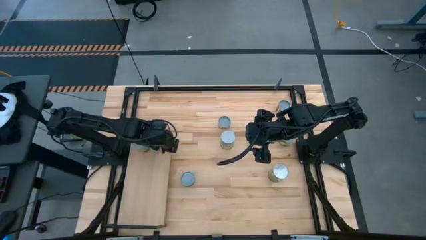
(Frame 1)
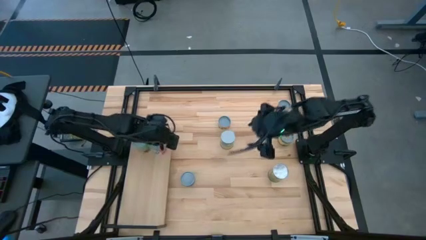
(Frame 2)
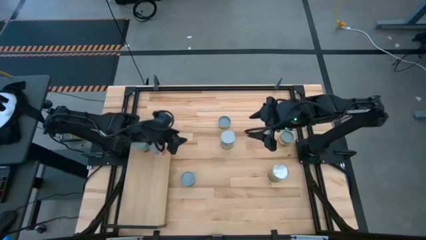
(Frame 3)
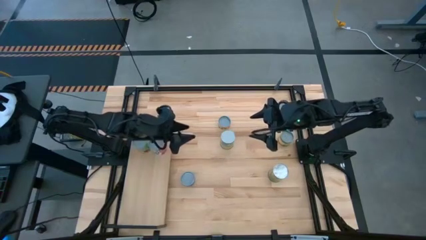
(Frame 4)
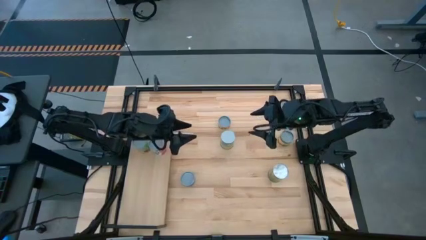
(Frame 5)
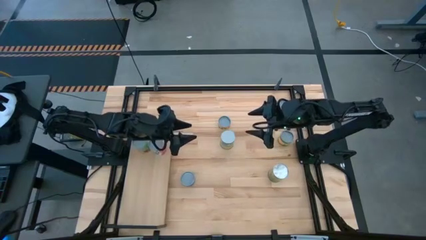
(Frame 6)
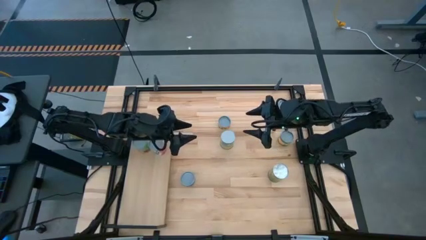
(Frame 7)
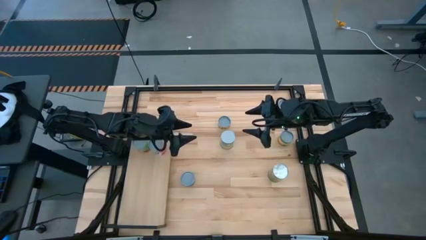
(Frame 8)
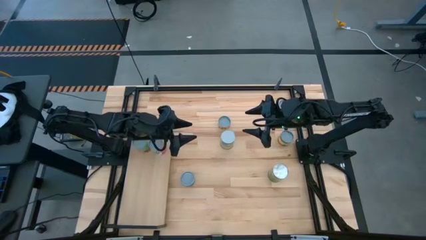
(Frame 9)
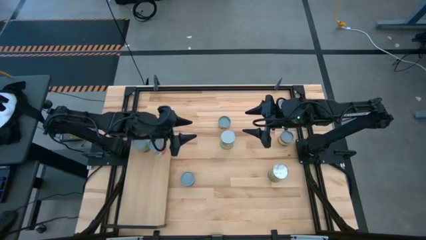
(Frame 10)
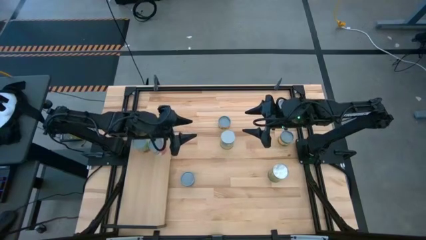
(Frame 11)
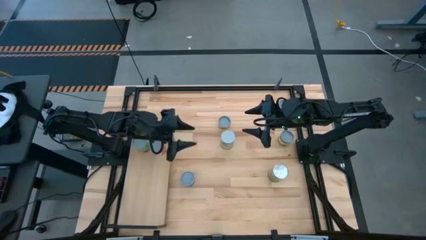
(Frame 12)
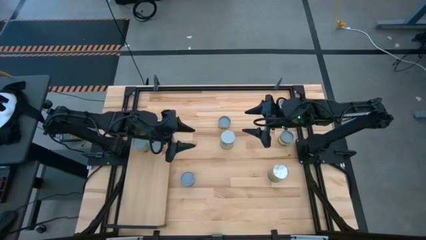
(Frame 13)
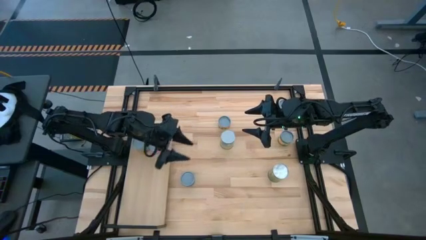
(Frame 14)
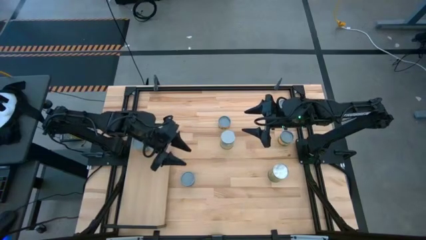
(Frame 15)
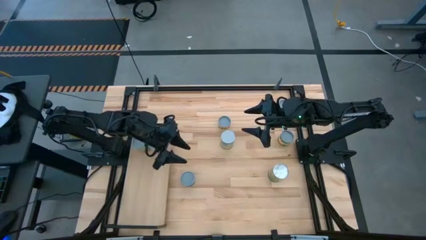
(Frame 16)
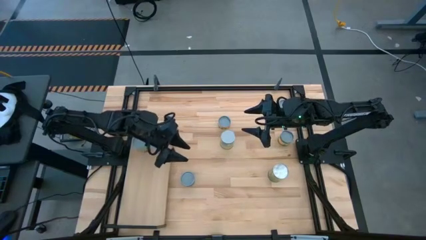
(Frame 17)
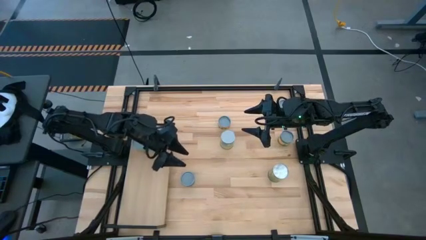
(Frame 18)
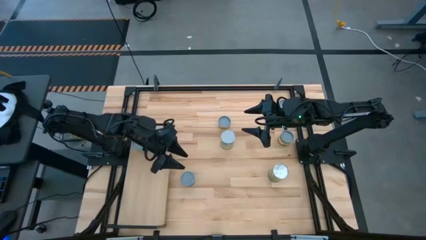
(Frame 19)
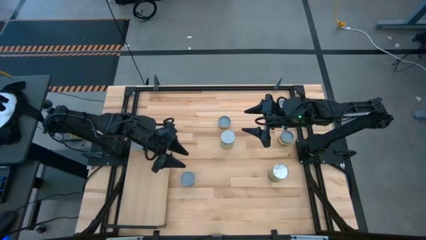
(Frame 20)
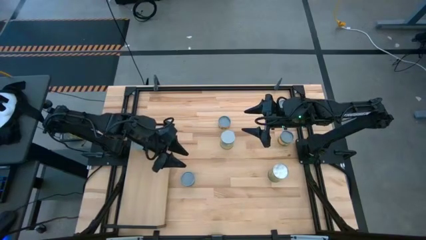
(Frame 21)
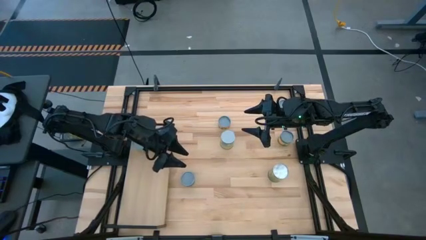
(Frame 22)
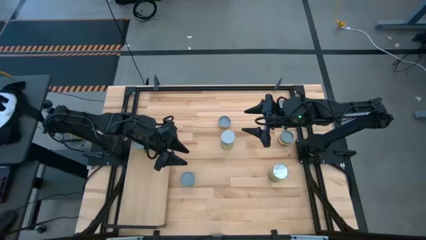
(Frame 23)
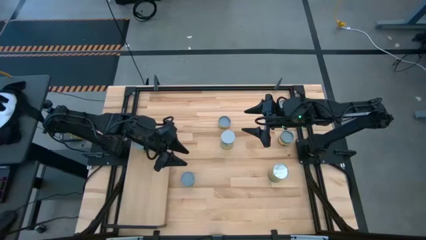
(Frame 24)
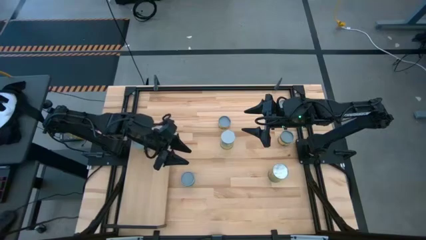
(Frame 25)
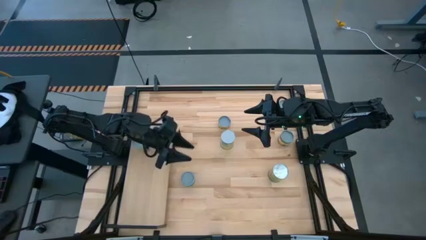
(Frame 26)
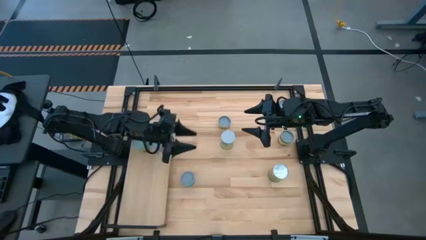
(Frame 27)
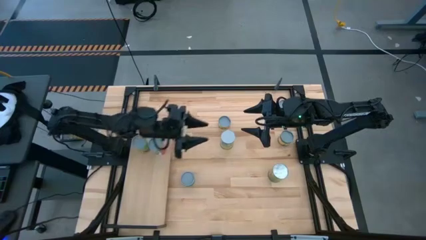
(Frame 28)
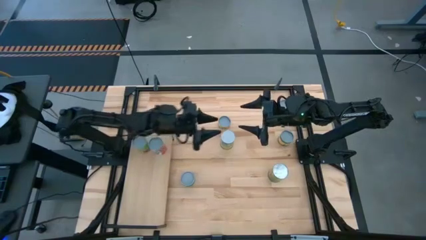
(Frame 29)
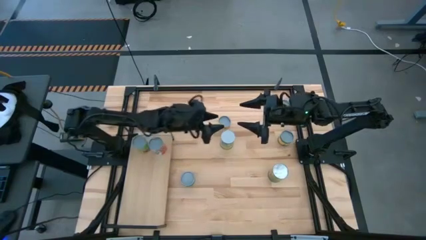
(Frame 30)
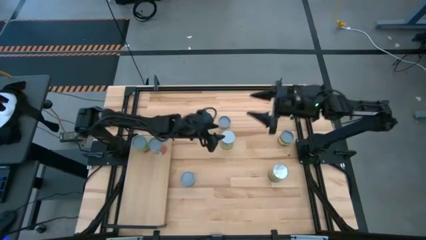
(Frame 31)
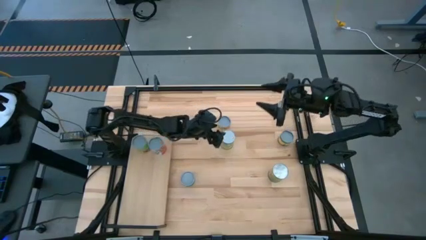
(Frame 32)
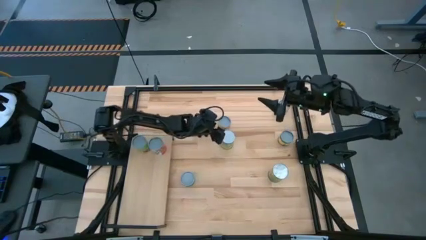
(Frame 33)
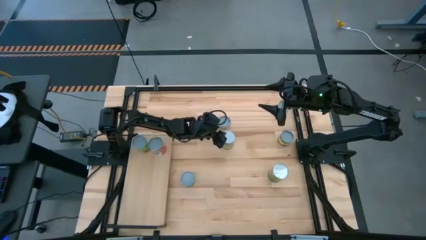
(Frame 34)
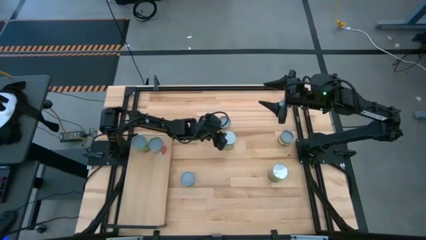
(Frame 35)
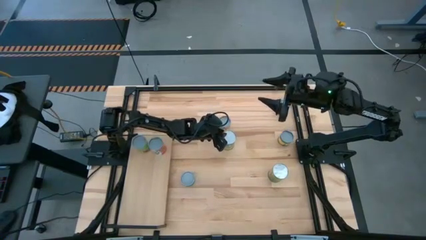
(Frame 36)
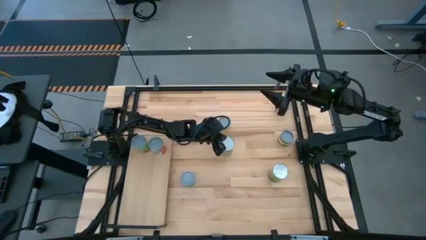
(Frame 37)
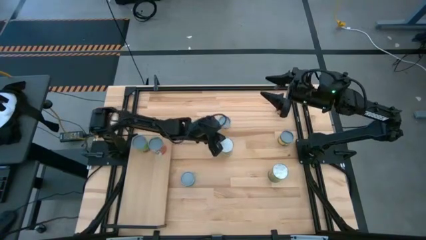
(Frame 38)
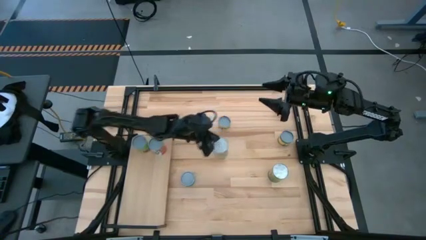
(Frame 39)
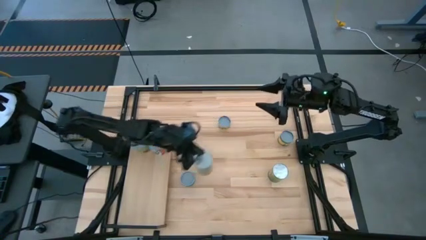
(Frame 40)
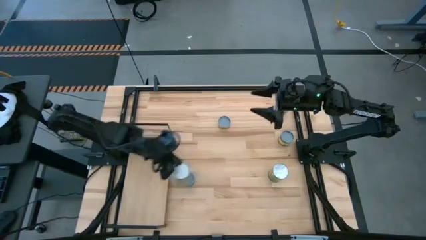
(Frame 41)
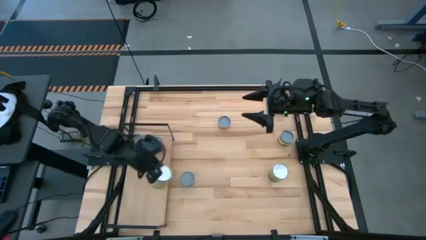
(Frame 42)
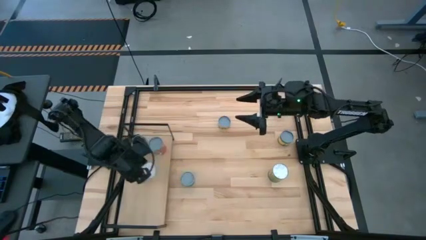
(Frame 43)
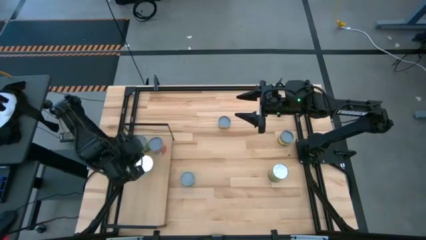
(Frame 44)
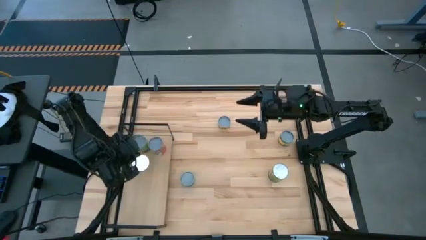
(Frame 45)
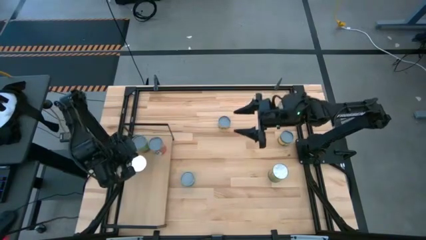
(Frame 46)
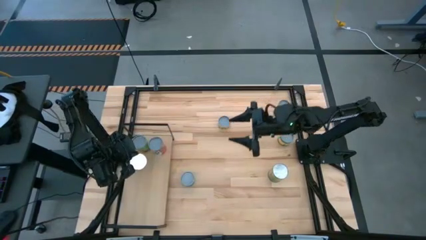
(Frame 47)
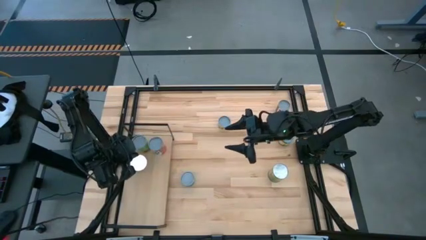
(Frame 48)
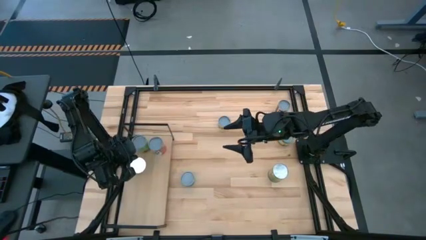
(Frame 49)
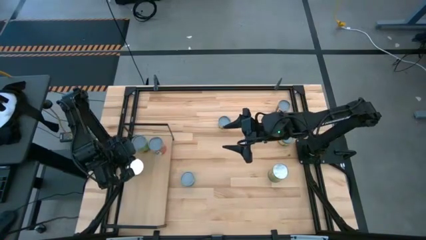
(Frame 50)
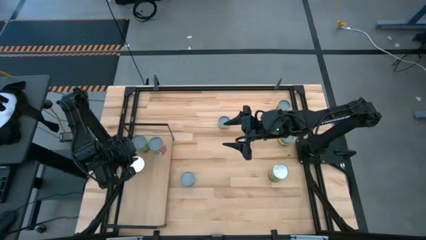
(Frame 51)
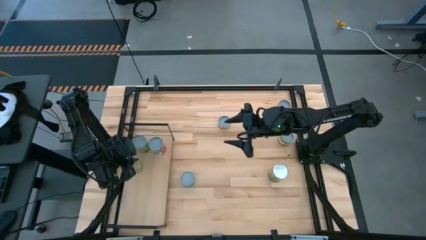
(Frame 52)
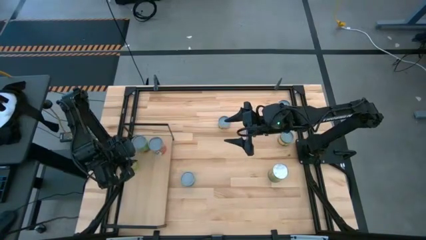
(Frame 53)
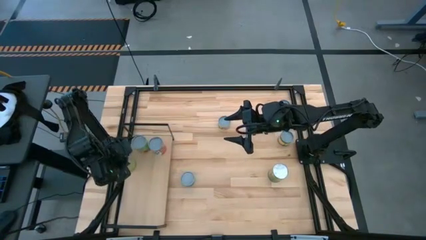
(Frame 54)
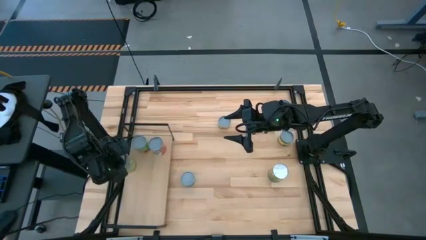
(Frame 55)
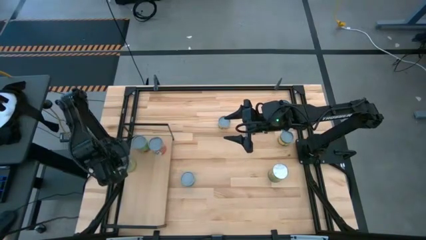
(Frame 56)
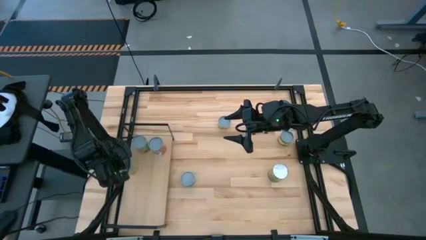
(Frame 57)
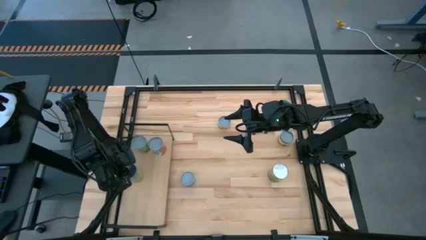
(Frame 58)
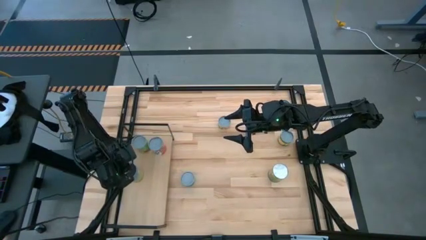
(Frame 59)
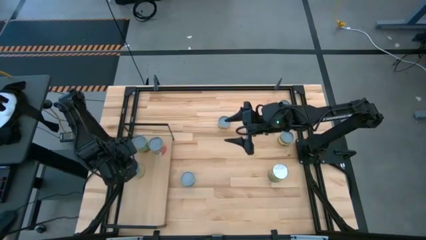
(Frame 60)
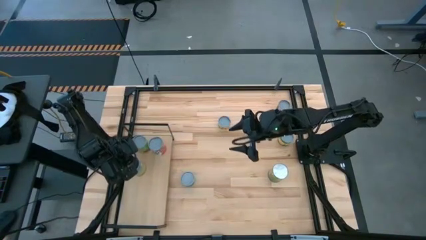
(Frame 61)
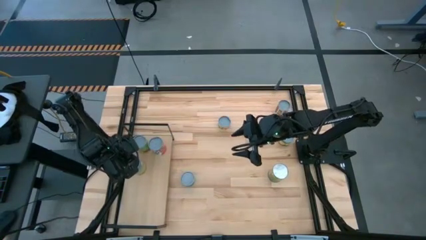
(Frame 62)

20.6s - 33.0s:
Task: Pick and place cans onto a shelf
Put the canned carrots on the shelf

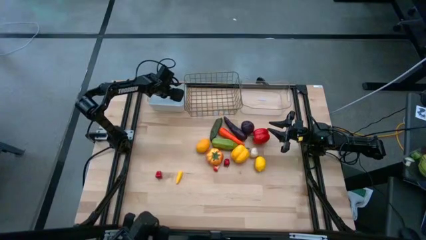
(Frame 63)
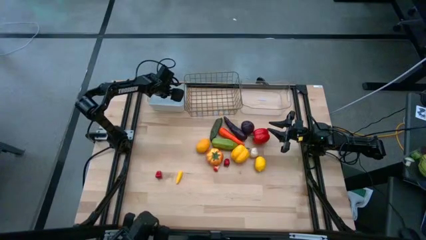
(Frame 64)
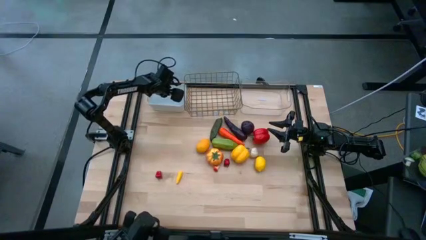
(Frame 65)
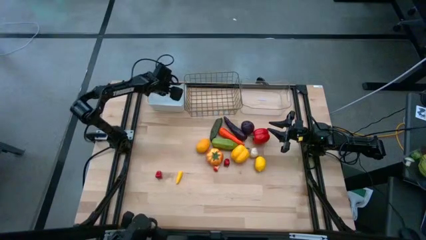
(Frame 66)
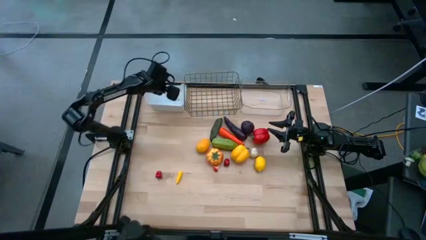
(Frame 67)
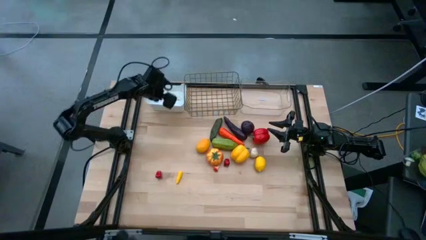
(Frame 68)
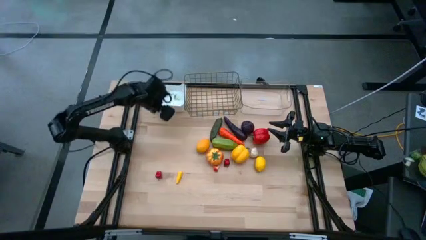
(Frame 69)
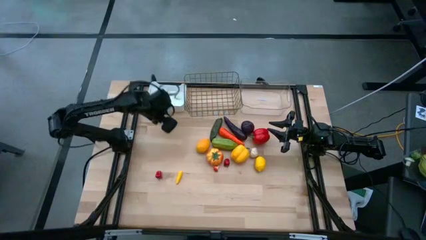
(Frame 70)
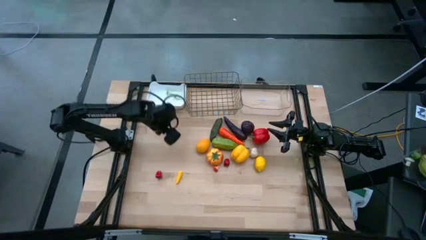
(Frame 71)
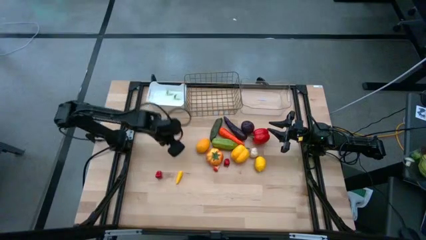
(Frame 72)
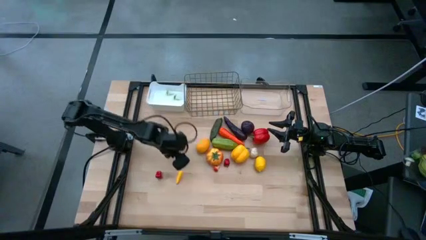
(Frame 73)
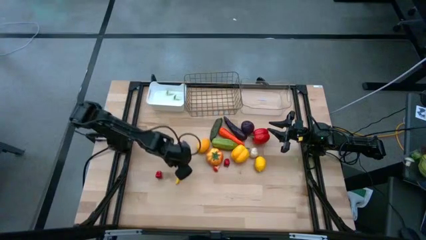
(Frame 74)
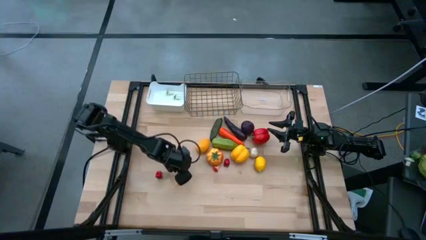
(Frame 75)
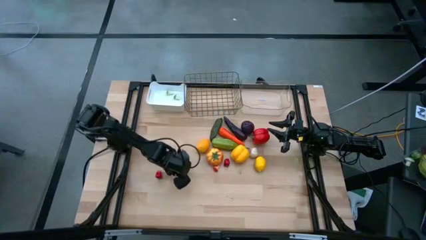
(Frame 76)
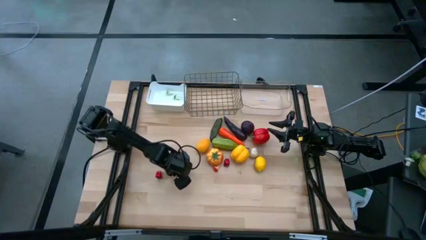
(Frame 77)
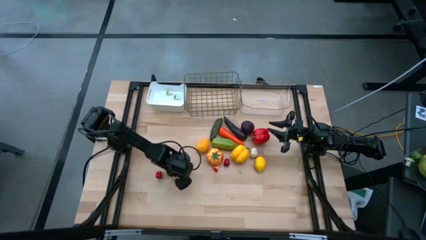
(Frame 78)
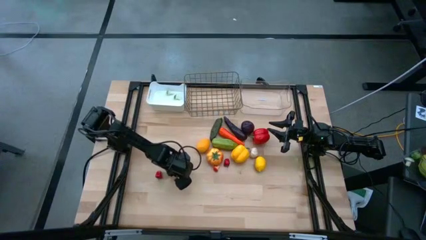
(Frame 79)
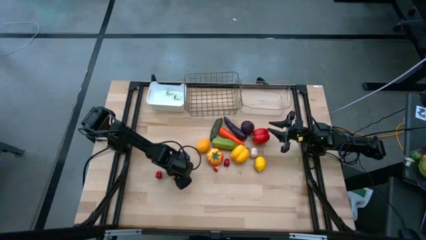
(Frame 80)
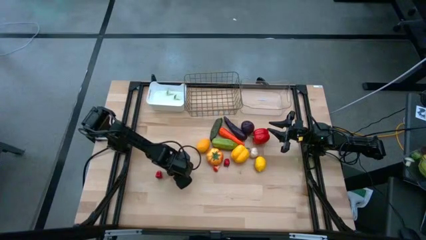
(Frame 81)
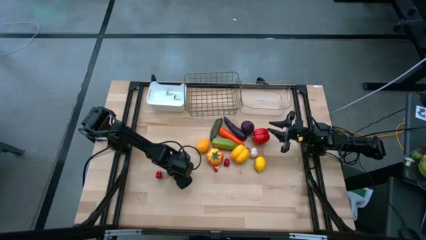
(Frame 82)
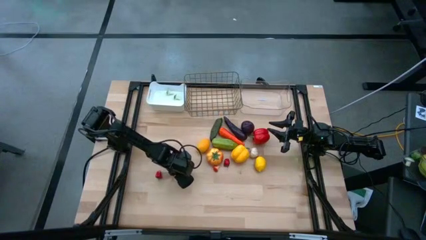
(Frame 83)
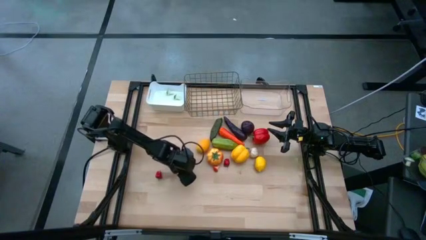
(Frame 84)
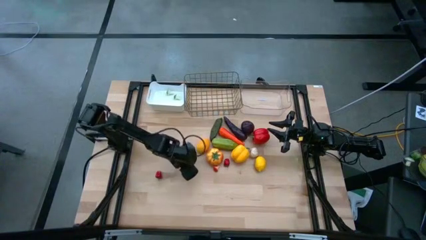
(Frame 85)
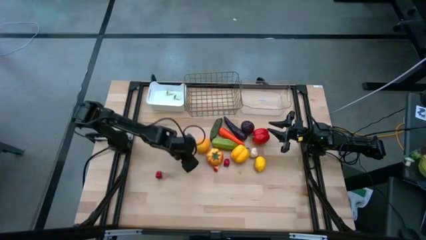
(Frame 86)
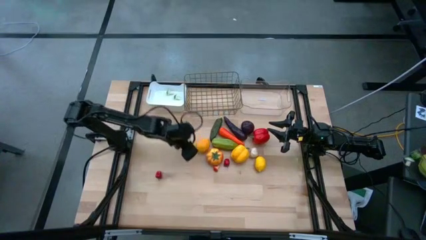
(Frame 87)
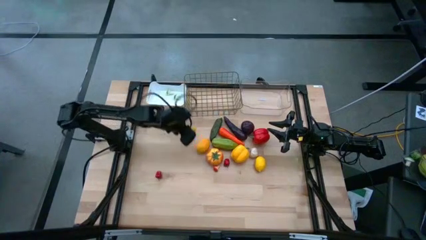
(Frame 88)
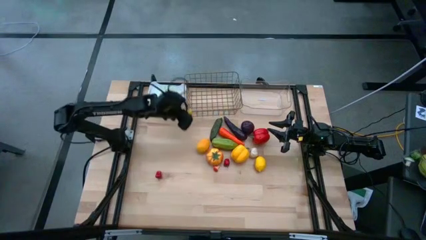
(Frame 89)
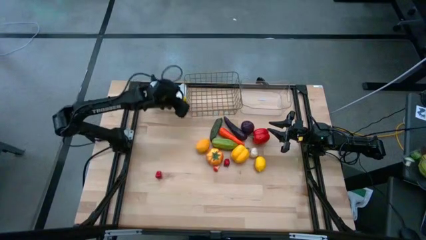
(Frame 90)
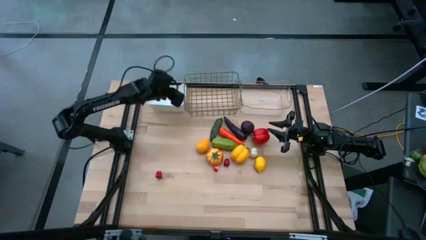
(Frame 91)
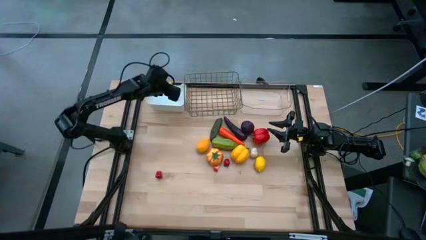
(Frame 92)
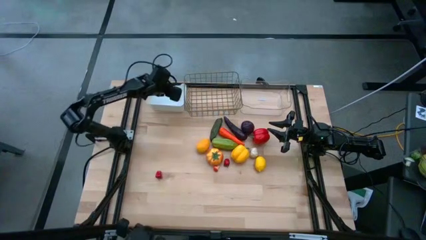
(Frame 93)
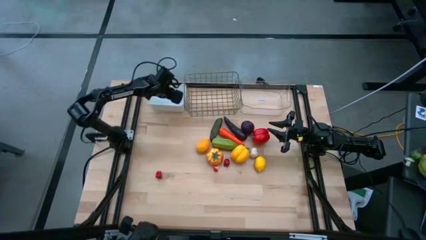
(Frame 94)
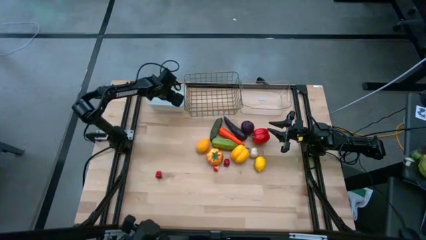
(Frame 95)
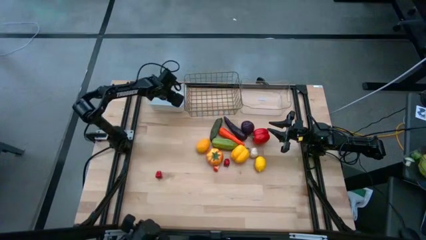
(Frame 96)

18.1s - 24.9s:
Task: Sort produce into baskets
Put the yellow corn into the white bin
